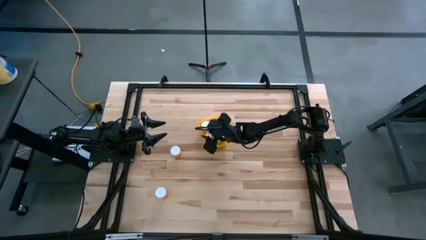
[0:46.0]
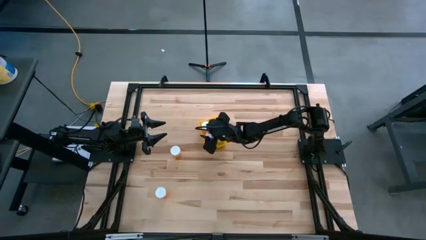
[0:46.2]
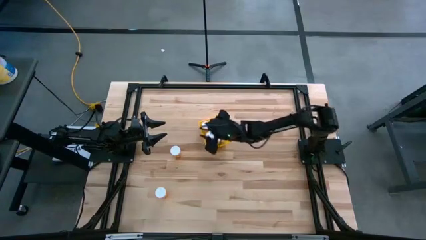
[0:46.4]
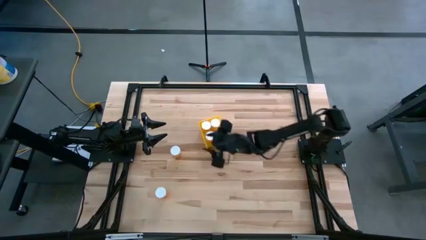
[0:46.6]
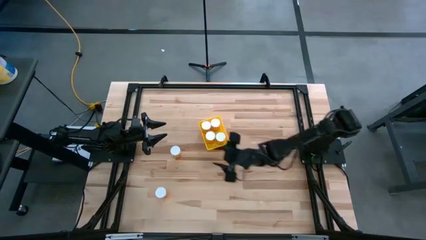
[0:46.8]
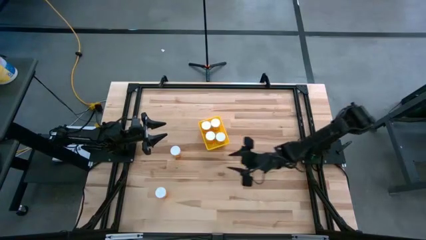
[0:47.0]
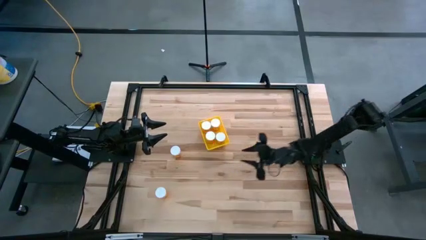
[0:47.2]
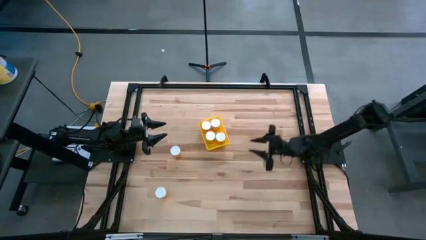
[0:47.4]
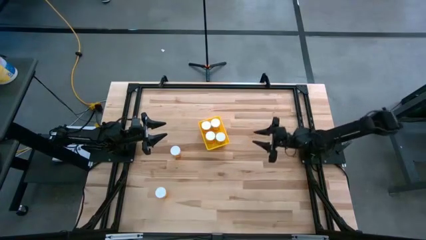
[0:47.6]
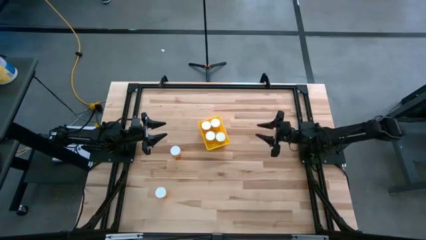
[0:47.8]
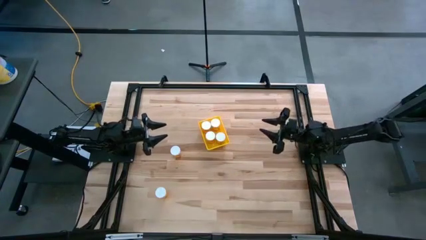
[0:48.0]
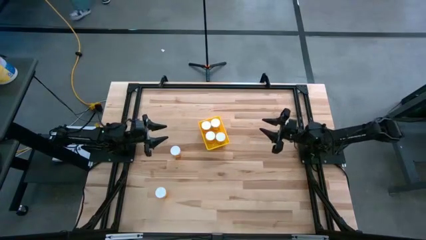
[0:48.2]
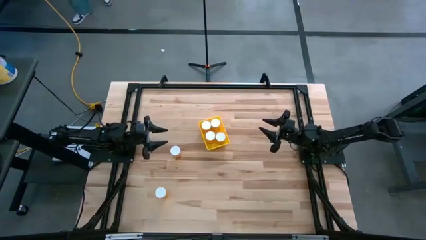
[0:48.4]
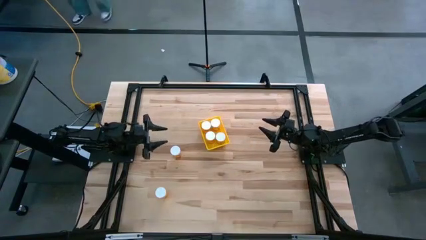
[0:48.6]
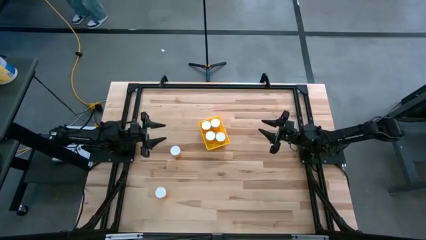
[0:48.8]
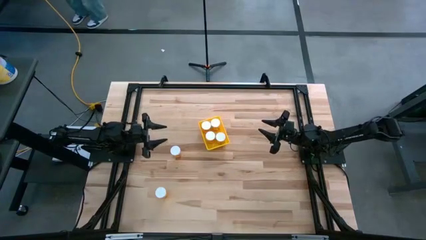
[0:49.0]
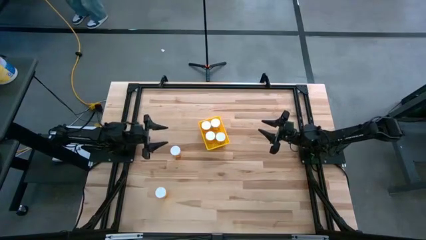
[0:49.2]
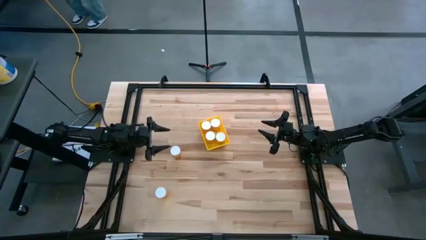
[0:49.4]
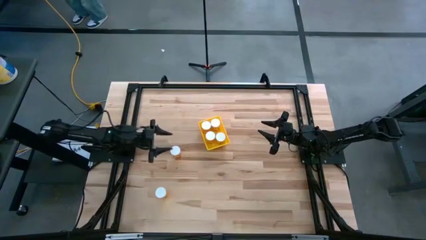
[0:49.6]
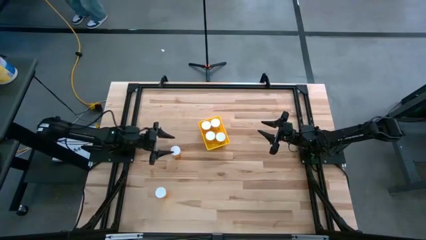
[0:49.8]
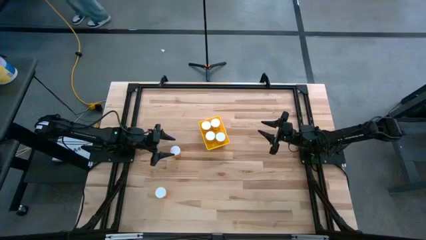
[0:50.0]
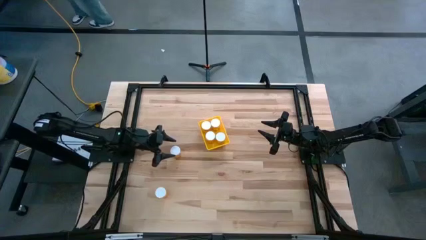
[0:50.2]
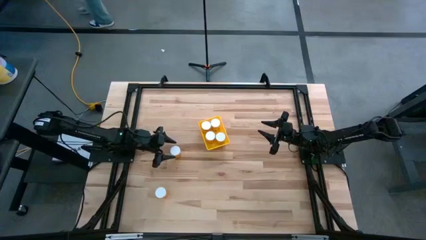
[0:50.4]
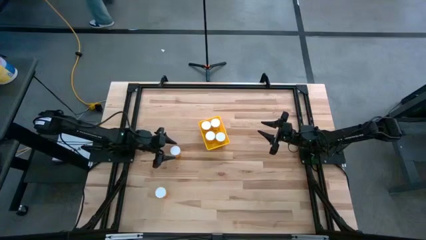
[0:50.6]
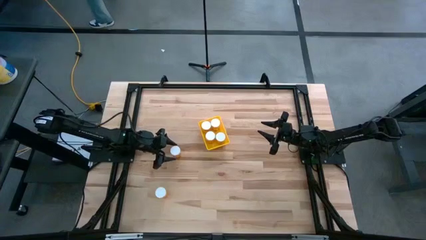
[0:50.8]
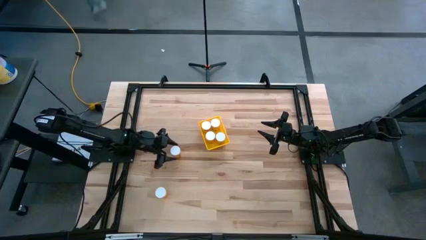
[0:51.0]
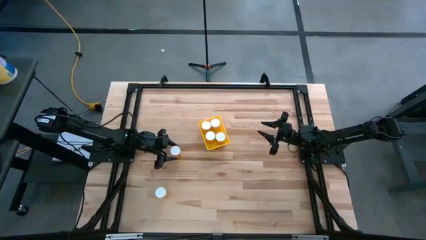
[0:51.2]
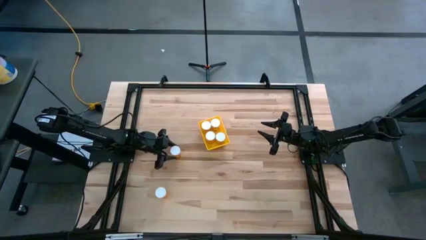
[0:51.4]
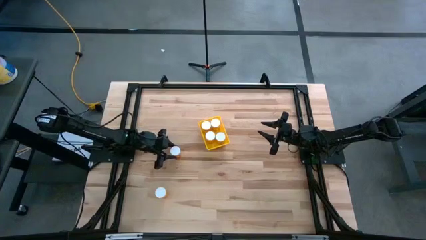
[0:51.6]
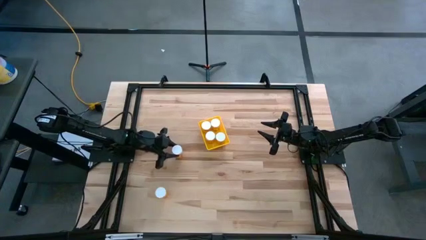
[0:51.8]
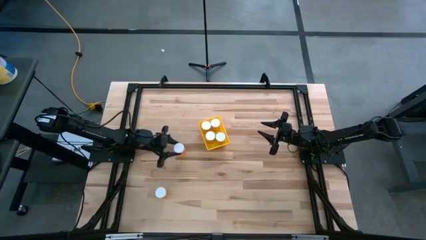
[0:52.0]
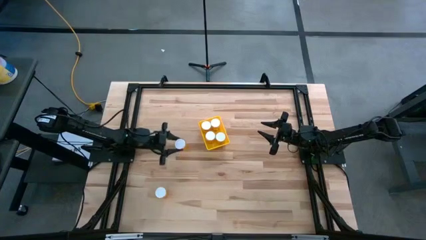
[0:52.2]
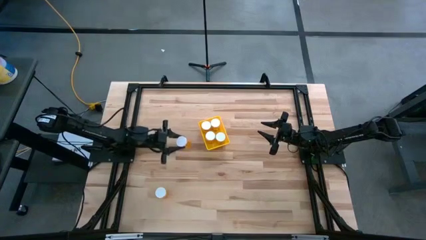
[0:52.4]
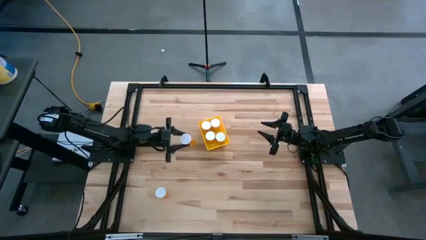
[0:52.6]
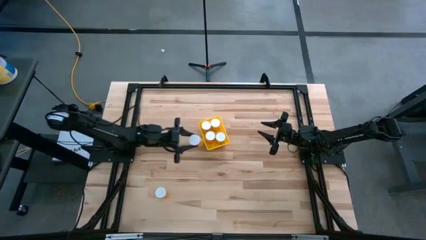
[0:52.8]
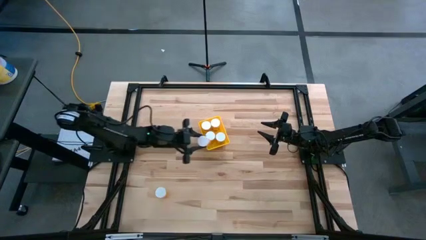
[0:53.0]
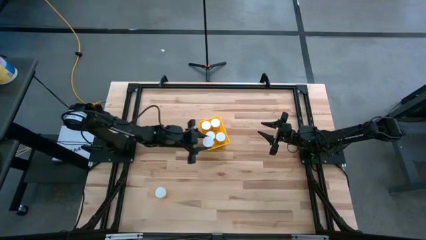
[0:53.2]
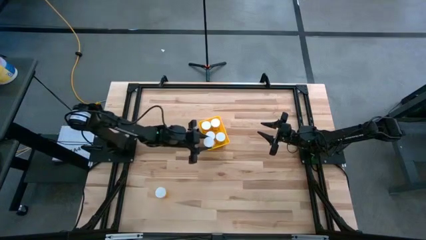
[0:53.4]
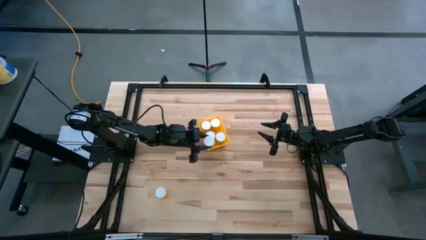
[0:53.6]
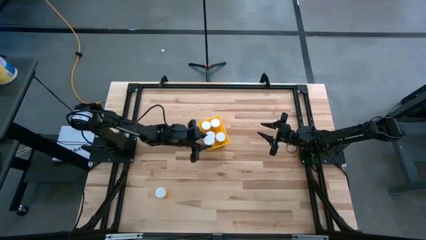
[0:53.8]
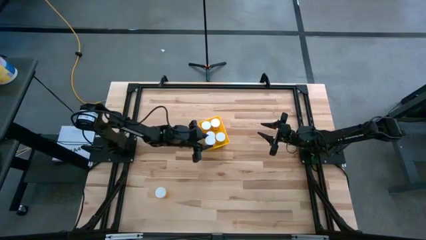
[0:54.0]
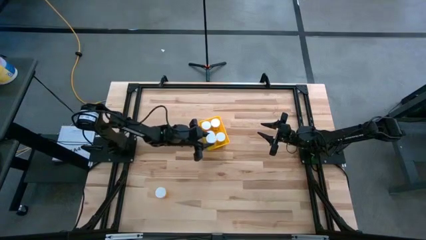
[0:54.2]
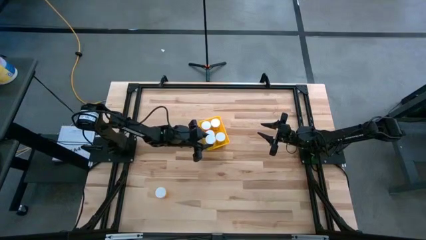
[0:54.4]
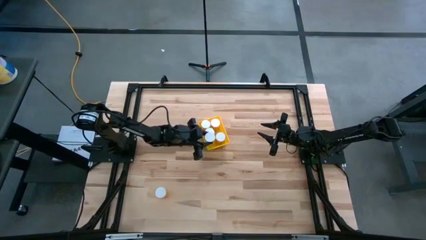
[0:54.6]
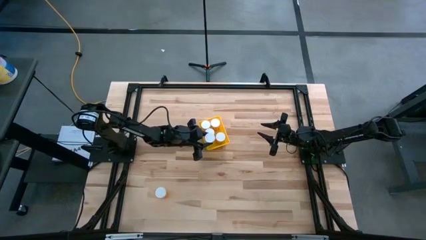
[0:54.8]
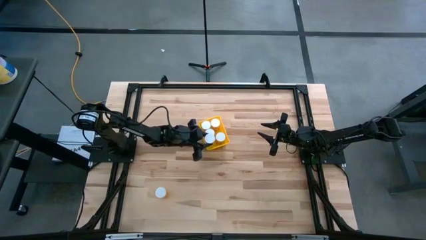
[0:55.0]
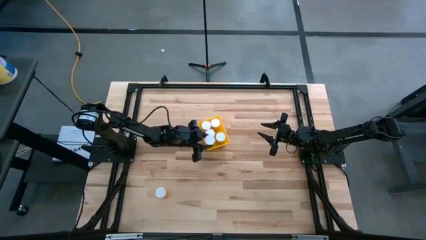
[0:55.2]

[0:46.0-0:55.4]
Task: Pick and place pill bottles into a basket
Put the orange pill bottle into the yellow bin

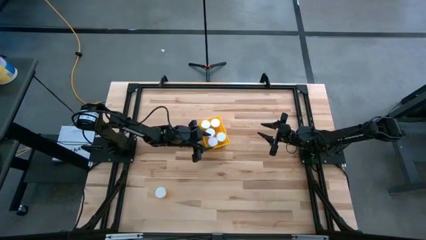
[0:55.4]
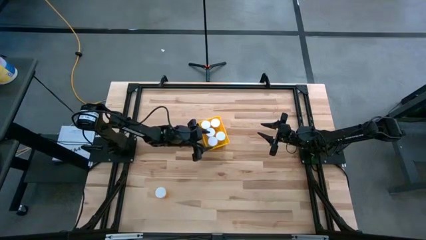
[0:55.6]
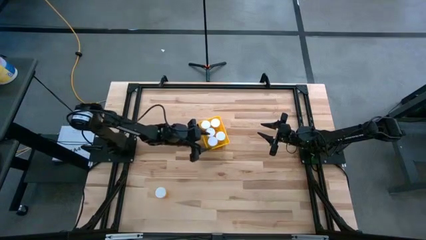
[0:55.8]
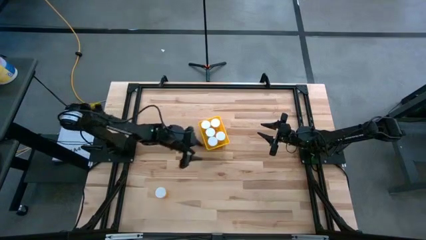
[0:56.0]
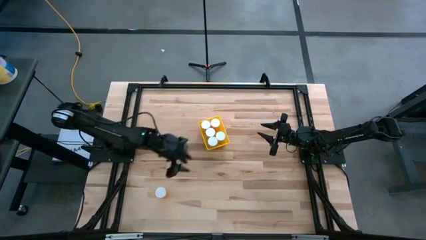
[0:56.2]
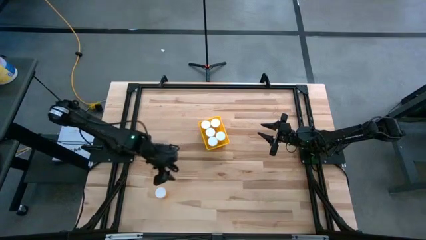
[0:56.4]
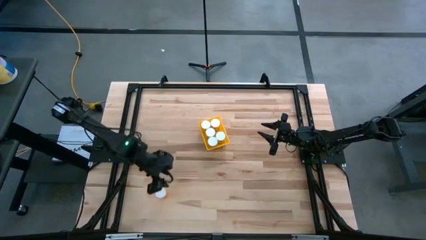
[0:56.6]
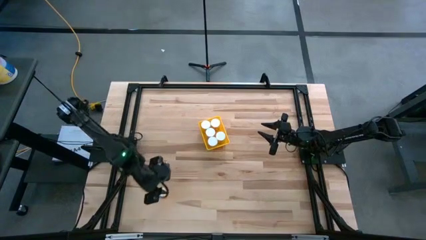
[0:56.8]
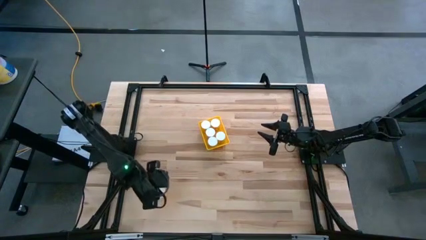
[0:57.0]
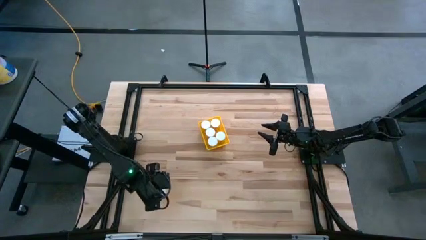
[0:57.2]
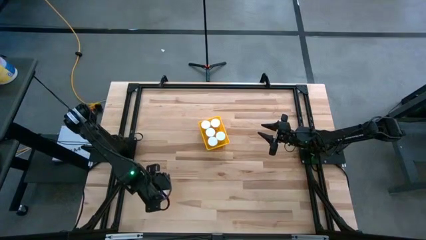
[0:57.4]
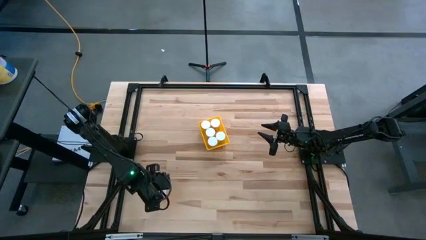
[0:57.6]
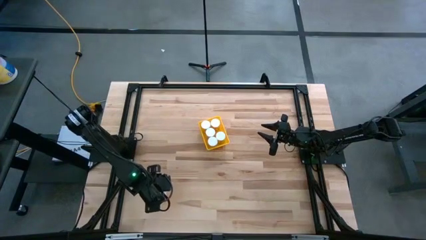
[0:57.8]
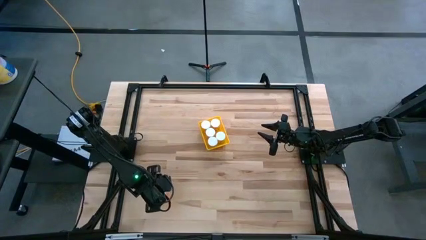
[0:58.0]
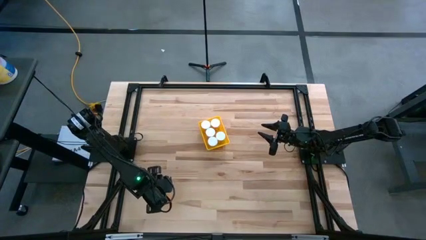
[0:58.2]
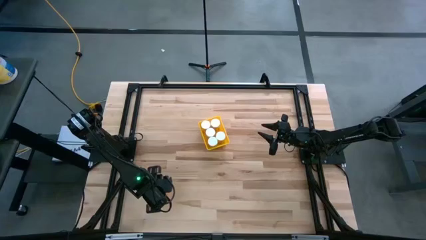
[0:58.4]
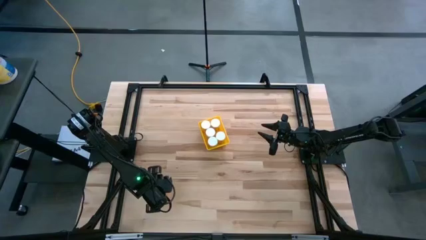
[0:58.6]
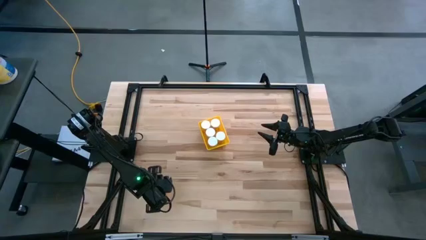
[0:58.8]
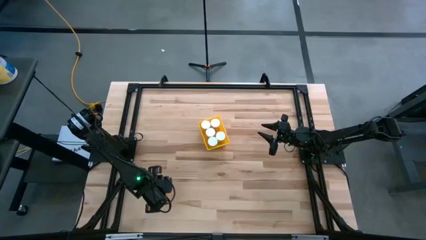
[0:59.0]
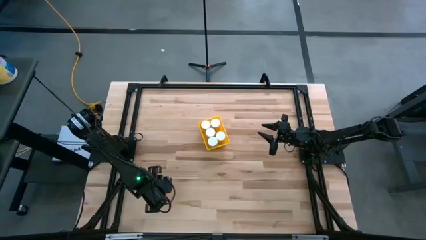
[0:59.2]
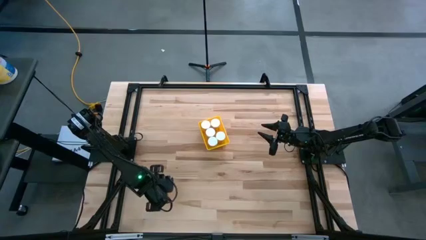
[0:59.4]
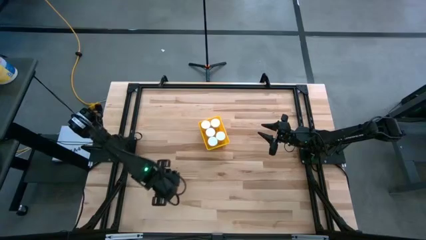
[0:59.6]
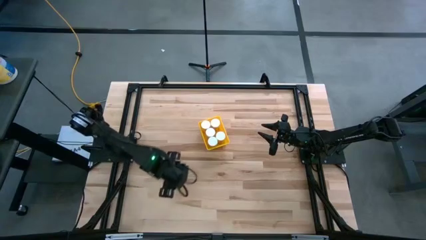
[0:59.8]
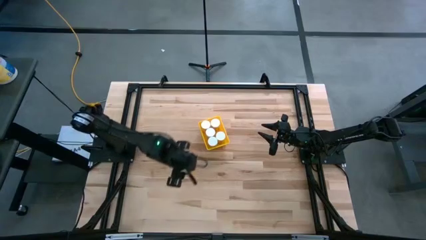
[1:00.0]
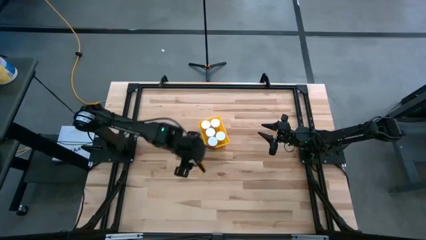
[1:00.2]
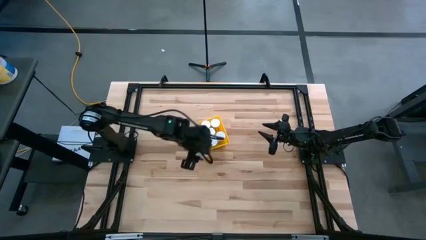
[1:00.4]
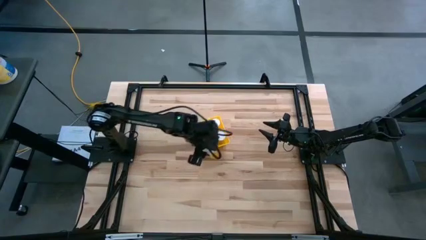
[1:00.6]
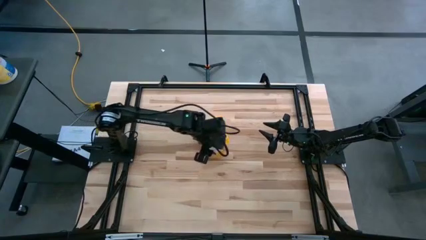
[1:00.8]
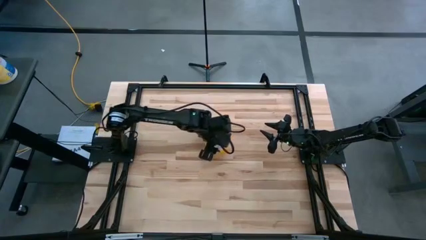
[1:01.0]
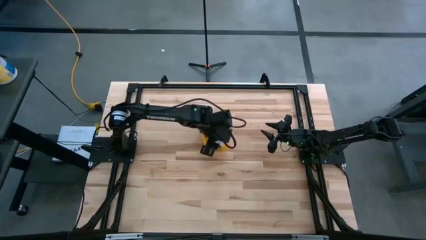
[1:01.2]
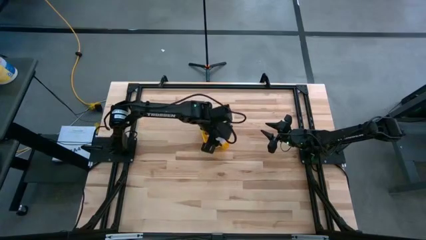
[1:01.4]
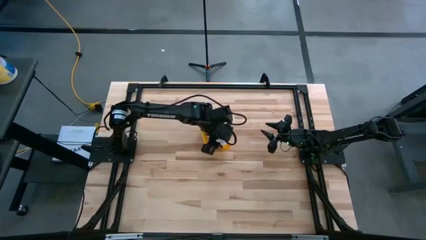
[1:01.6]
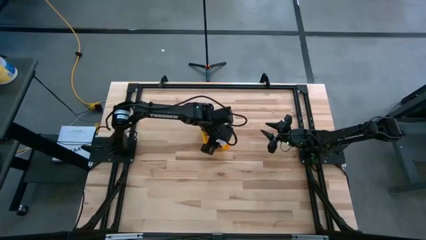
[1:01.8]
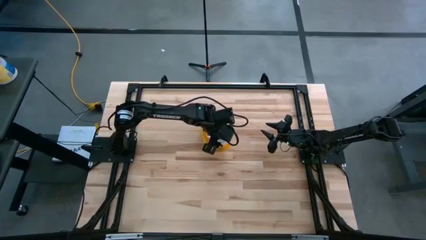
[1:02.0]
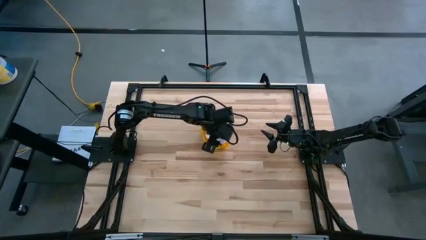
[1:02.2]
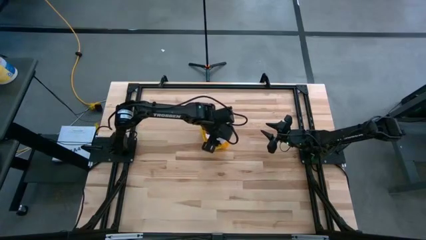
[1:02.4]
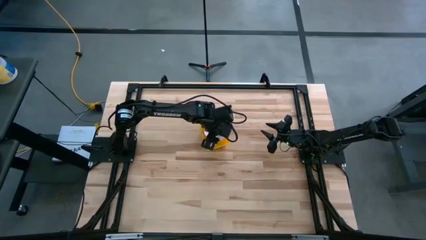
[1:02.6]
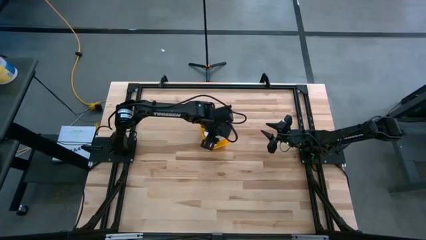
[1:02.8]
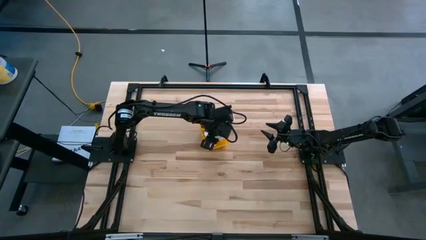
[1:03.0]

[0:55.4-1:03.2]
Put the orange pill bottle into the yellow bin
